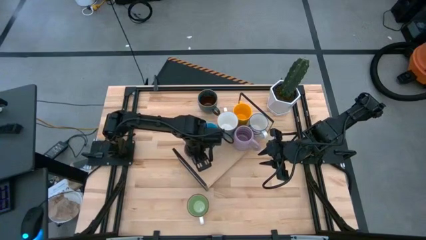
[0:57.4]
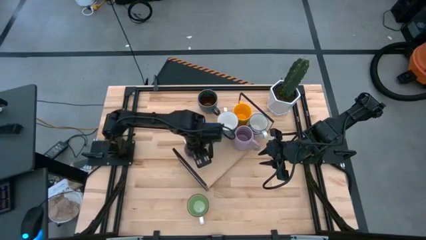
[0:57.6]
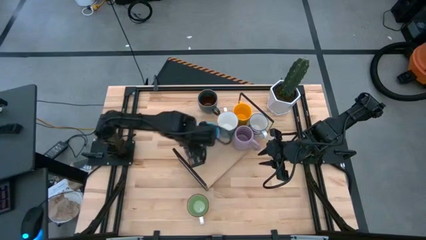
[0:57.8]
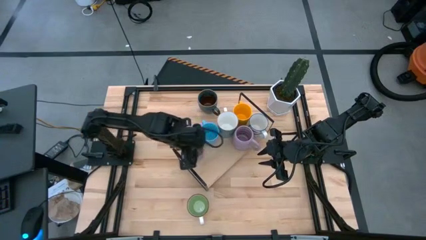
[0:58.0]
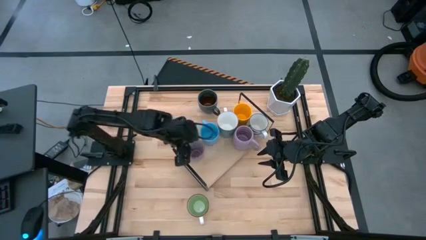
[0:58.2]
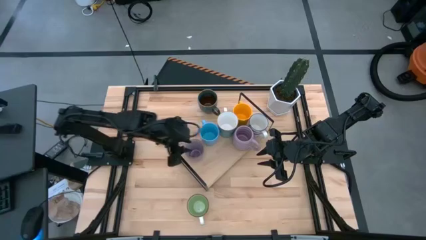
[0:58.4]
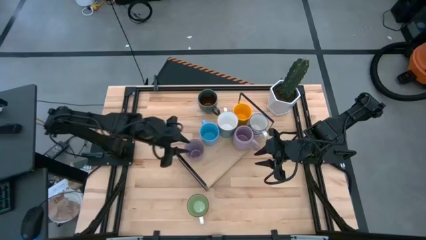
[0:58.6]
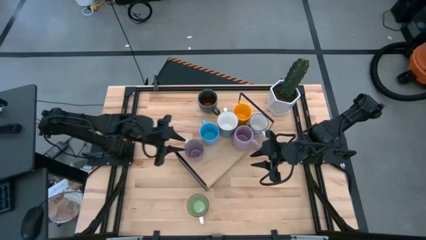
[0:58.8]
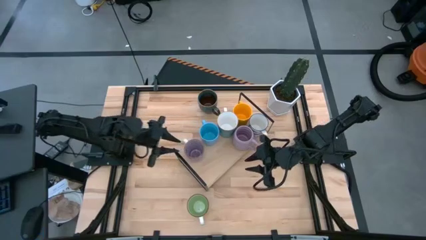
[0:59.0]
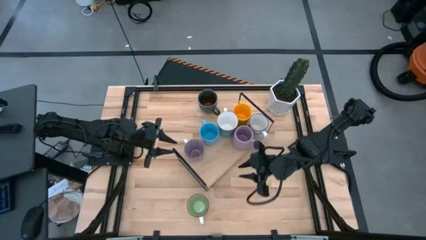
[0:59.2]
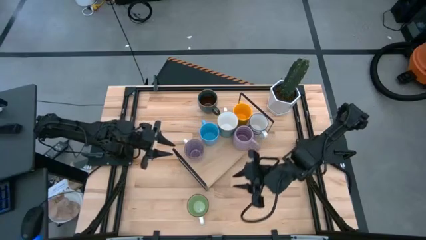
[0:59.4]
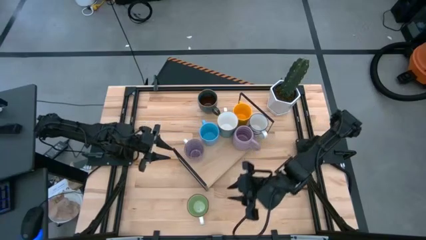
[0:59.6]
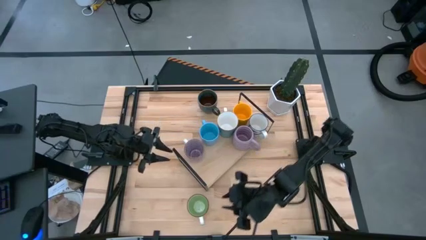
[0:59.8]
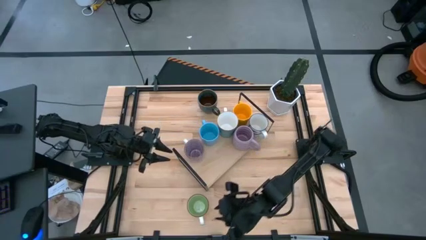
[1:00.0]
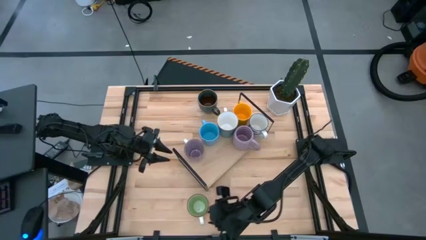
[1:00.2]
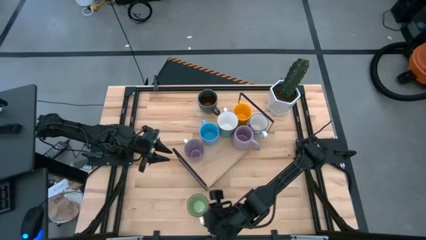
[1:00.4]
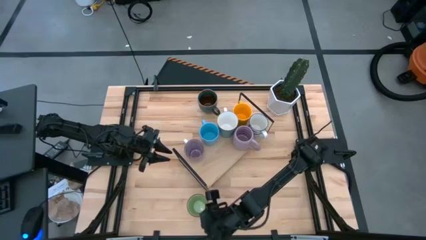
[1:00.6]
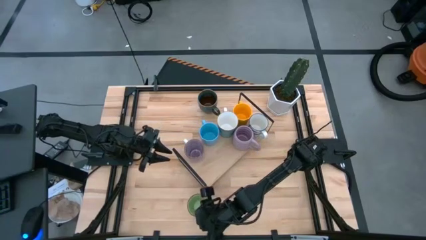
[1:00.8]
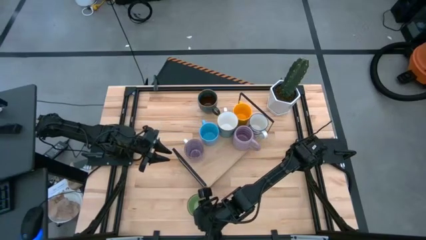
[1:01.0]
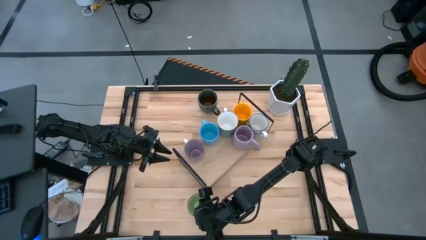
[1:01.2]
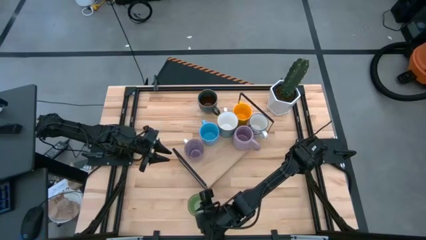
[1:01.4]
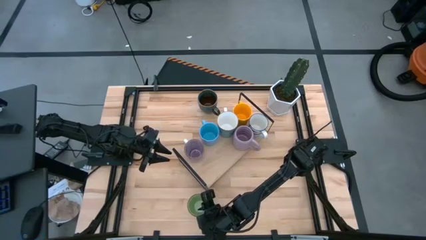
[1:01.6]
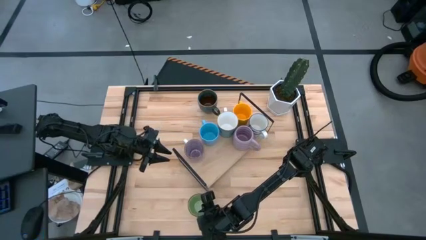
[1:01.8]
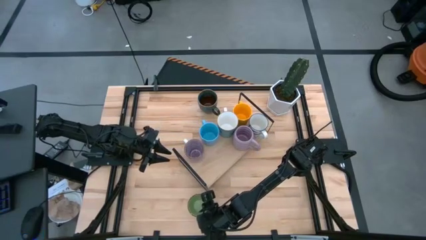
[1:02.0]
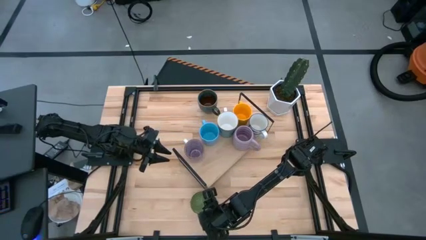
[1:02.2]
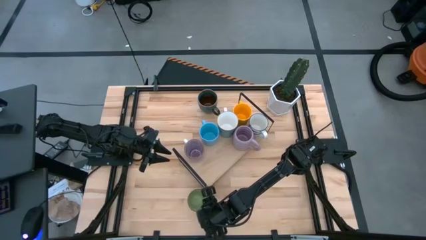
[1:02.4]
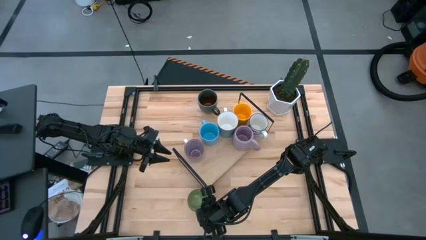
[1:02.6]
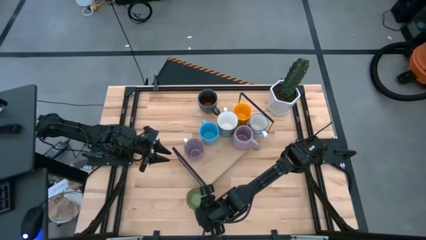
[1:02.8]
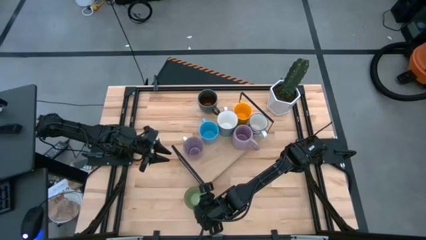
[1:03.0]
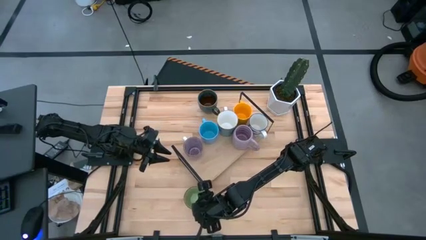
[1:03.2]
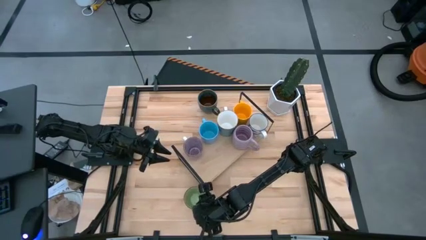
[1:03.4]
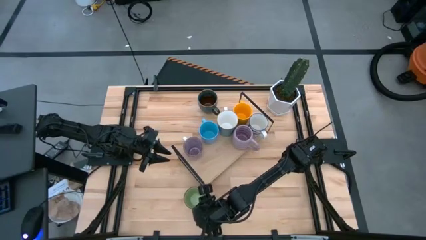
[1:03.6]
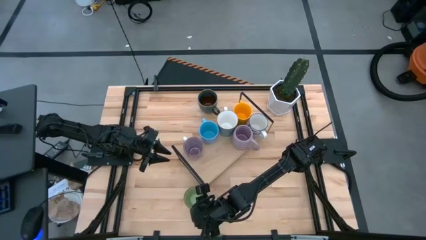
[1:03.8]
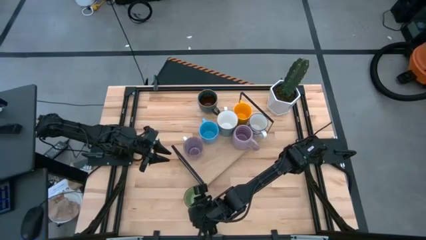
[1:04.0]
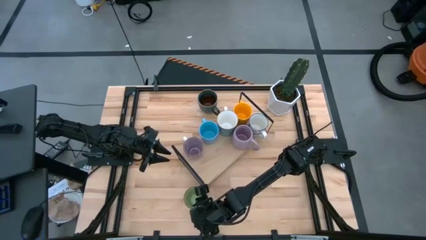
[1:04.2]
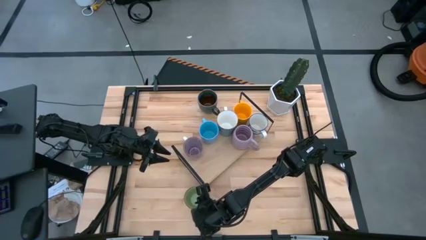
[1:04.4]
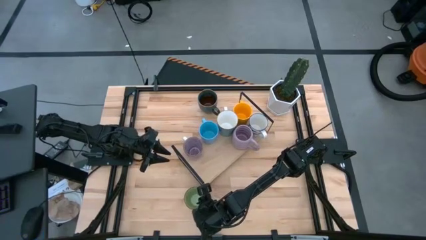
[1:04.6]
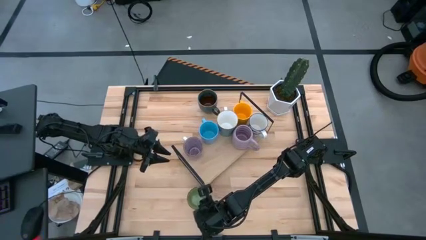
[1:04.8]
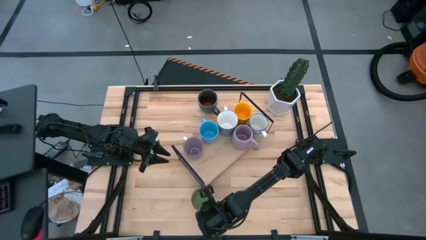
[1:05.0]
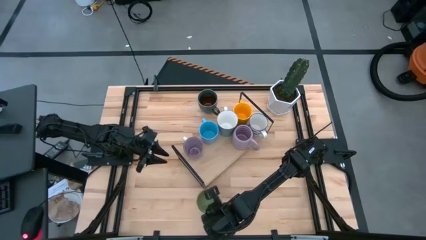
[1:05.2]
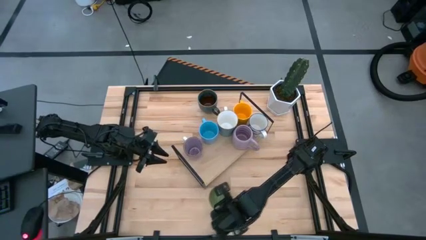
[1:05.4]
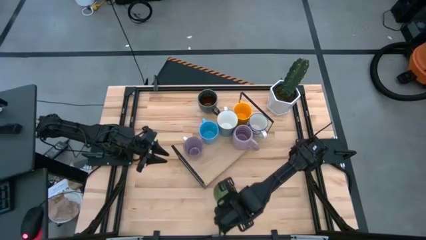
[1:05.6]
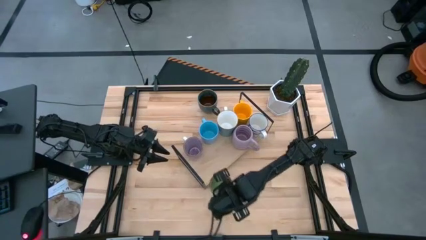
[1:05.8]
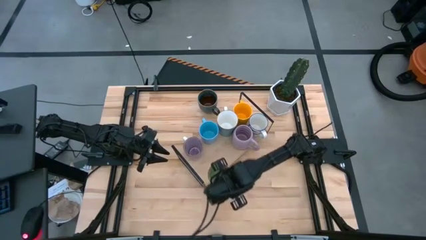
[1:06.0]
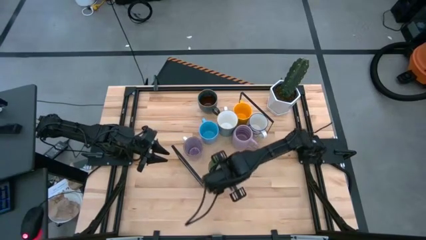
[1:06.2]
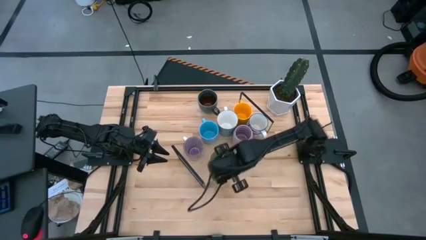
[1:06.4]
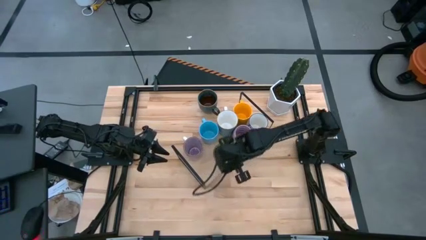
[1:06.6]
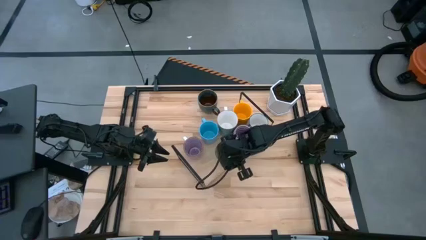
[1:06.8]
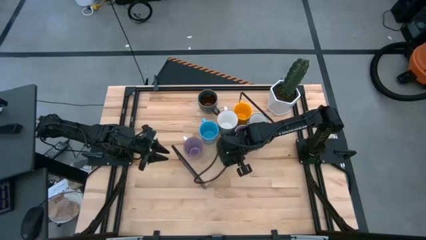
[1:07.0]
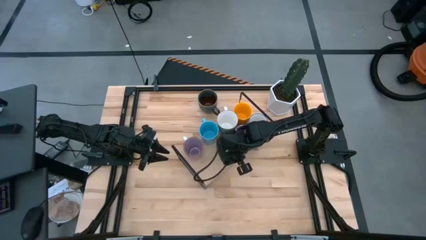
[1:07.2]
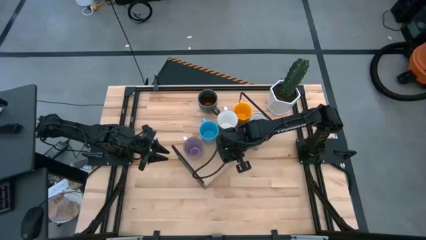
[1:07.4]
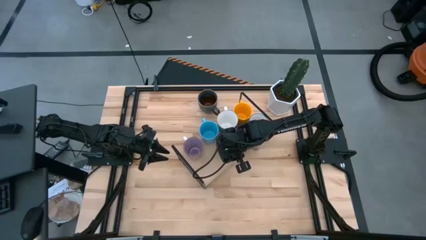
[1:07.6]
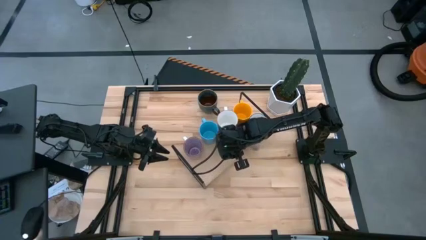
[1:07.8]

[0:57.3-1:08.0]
Task: Place coffee mugs
Put the green mug on the shelf

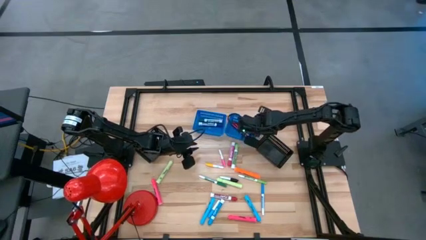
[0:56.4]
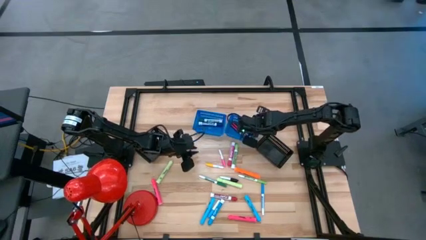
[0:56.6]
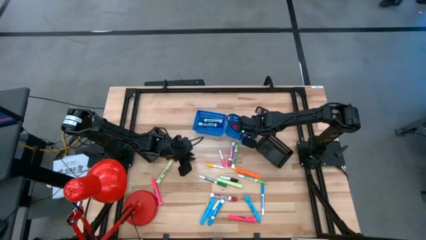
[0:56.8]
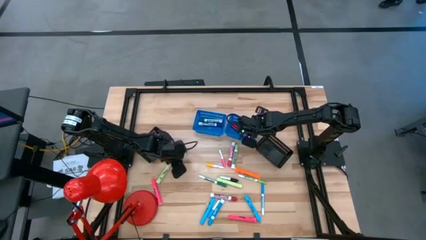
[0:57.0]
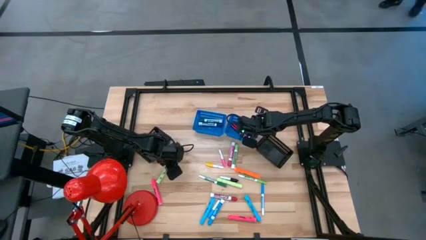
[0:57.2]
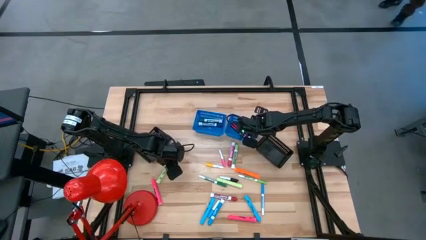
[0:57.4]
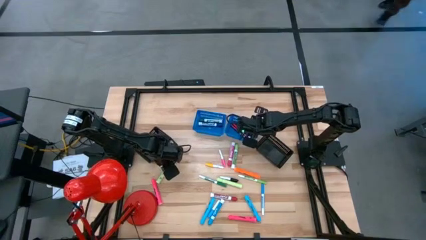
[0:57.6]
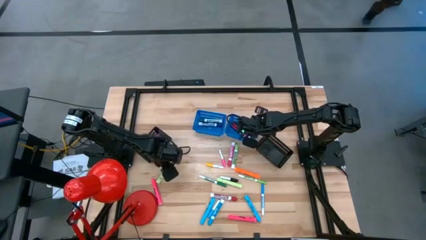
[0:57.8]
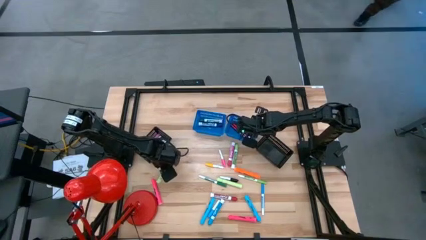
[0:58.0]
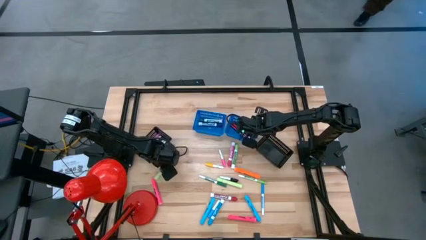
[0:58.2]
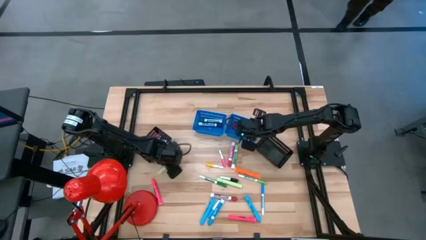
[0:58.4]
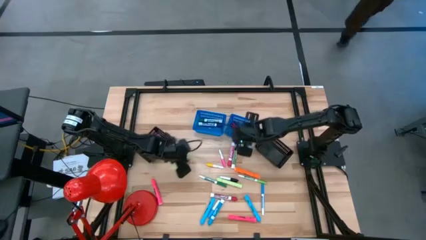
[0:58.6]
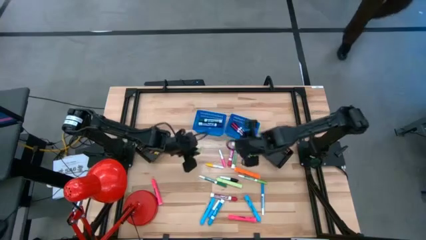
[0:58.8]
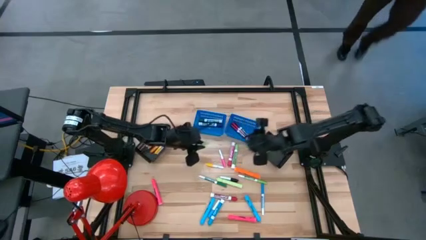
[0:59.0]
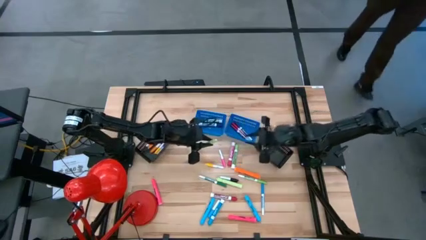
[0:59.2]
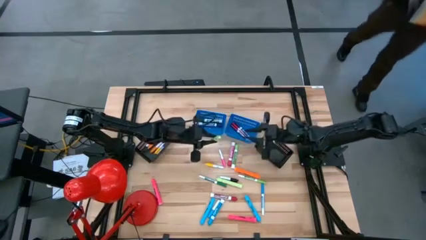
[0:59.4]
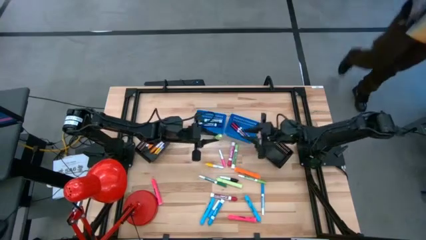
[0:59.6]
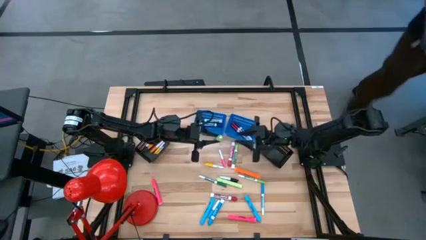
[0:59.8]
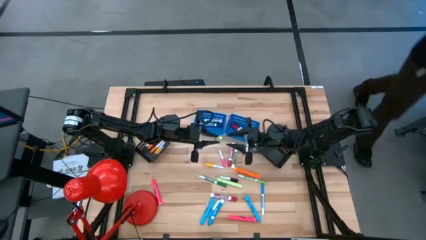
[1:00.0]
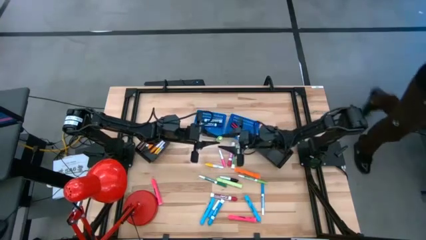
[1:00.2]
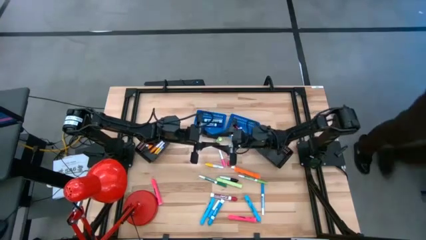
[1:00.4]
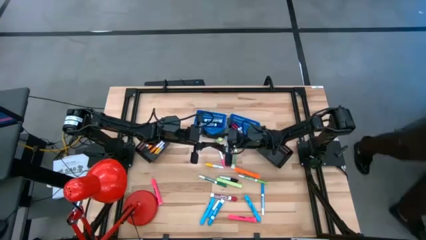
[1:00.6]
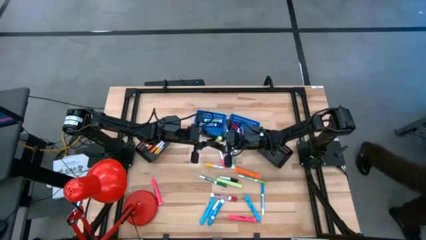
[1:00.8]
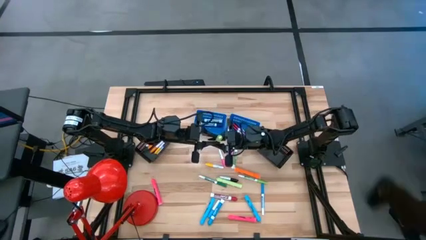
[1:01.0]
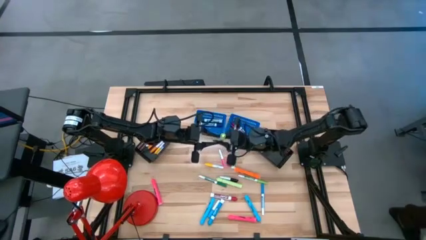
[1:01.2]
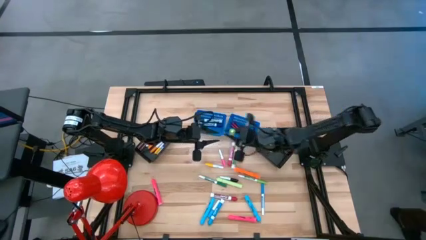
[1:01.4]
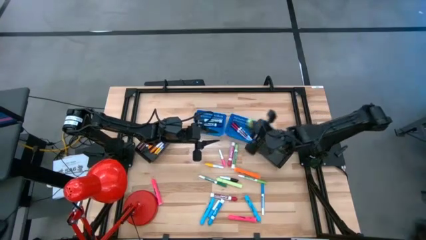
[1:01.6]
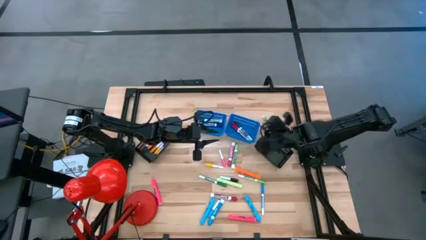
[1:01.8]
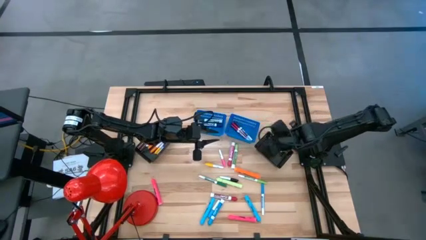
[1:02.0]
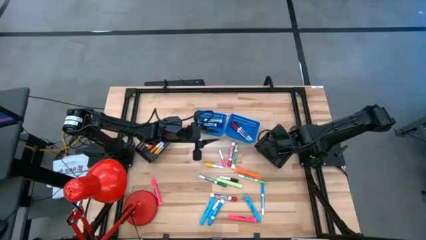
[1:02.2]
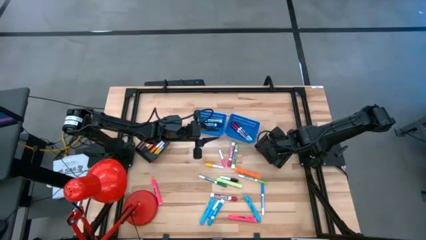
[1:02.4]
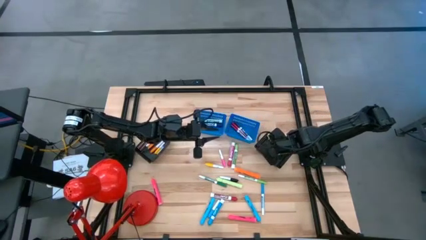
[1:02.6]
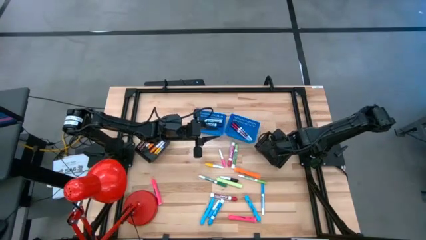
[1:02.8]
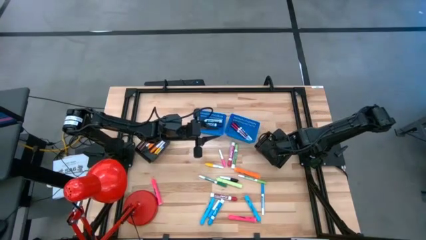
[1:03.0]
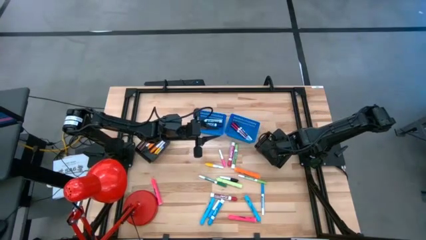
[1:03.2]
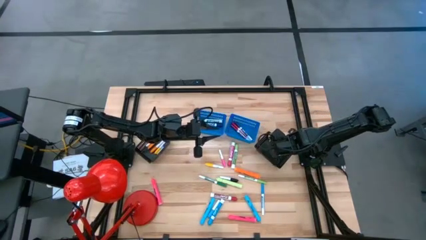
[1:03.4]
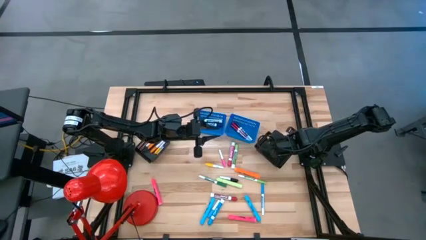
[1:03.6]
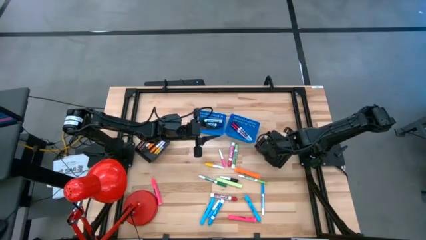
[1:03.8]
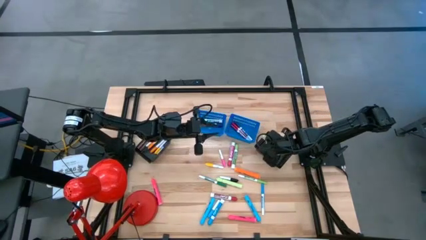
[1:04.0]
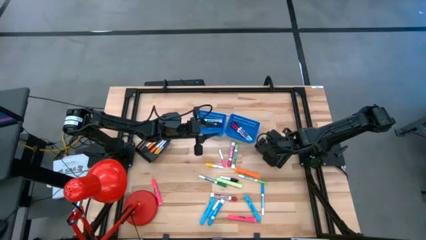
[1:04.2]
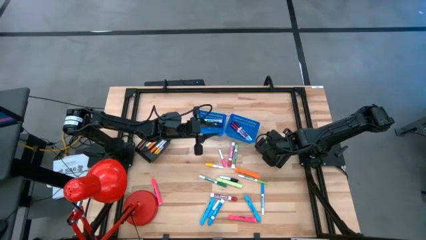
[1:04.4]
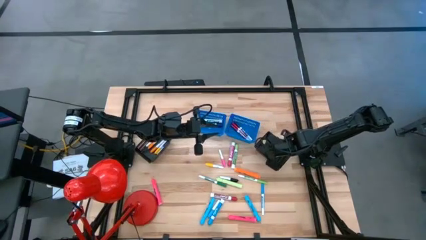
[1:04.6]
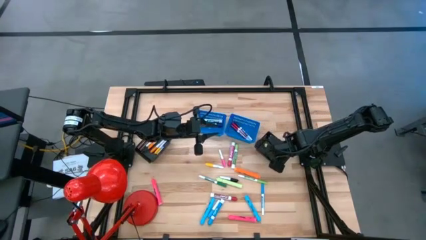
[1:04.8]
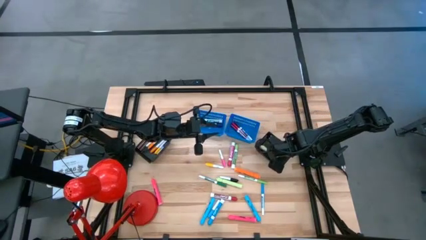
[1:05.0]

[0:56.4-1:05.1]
Task: Pick & Place Markers
Put the light green highlighter into the right black bin
